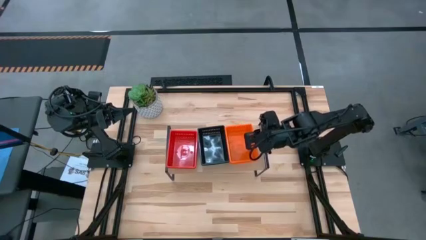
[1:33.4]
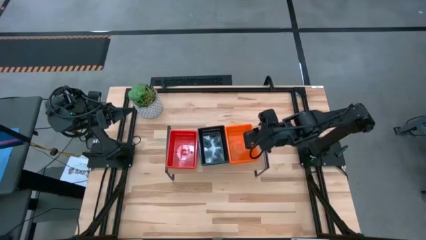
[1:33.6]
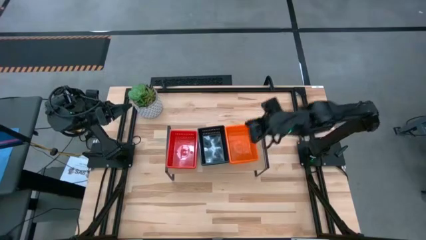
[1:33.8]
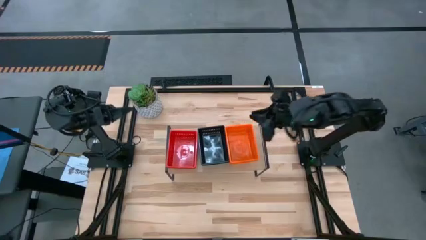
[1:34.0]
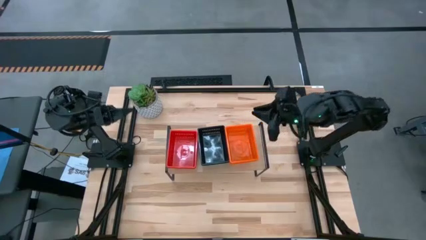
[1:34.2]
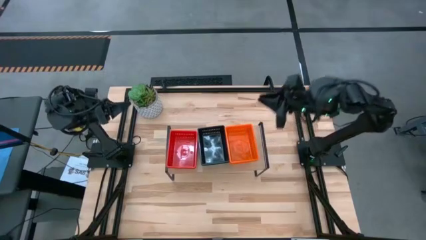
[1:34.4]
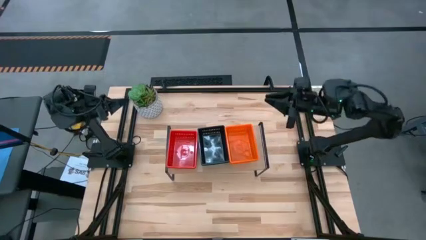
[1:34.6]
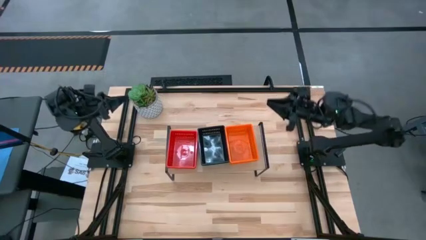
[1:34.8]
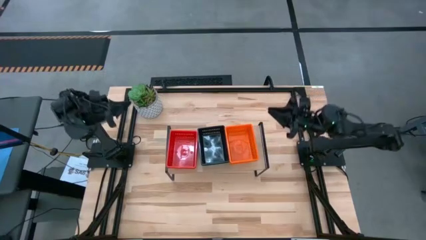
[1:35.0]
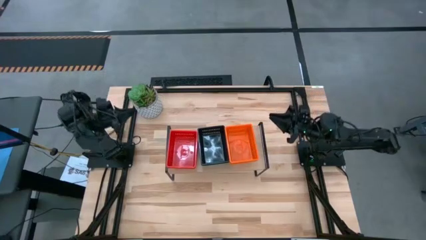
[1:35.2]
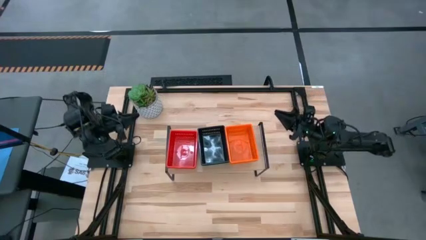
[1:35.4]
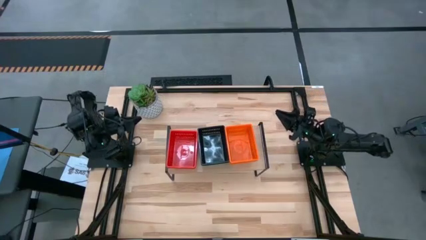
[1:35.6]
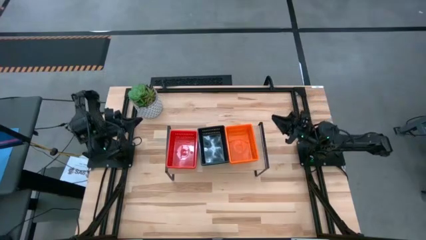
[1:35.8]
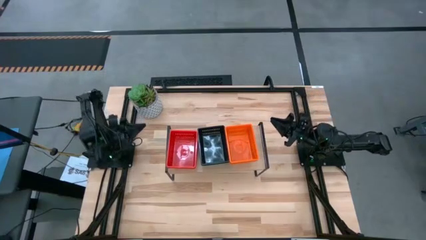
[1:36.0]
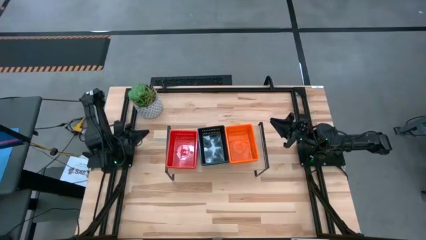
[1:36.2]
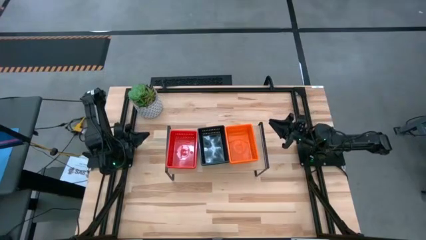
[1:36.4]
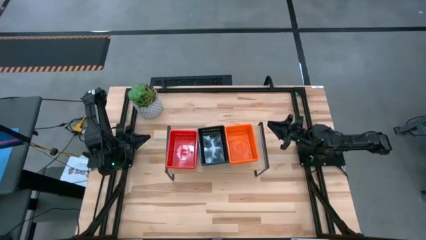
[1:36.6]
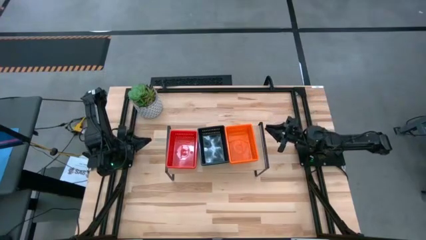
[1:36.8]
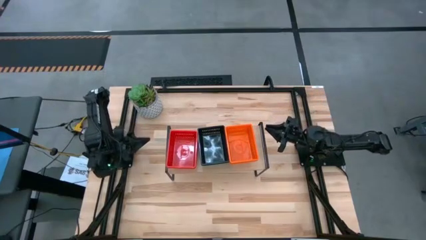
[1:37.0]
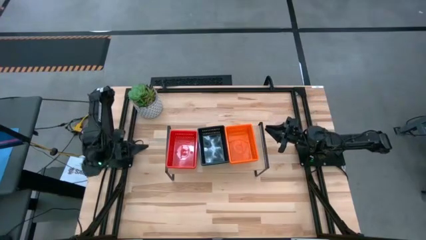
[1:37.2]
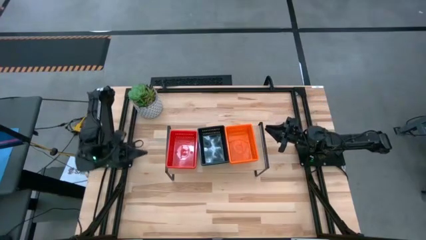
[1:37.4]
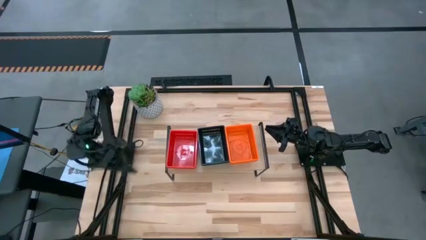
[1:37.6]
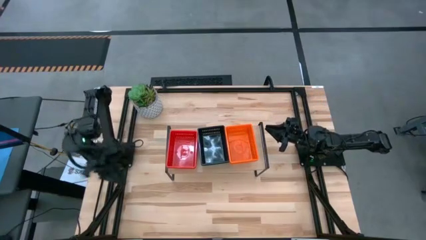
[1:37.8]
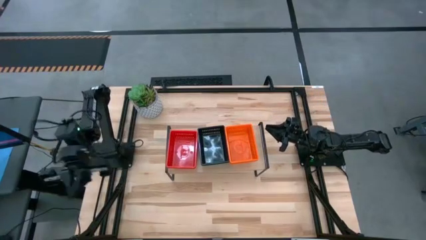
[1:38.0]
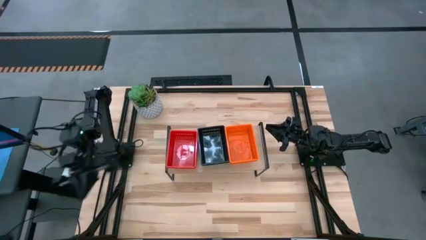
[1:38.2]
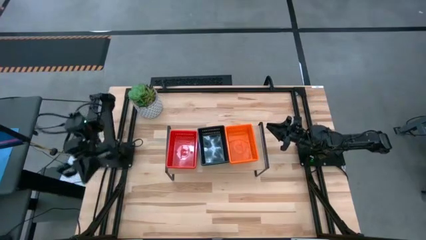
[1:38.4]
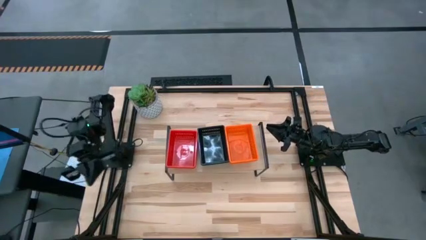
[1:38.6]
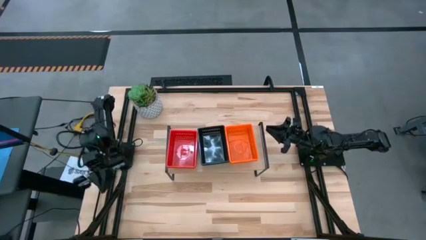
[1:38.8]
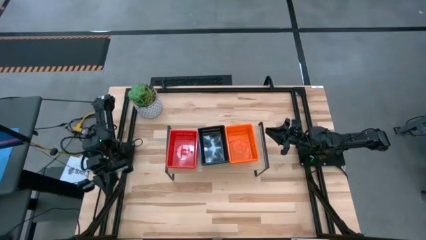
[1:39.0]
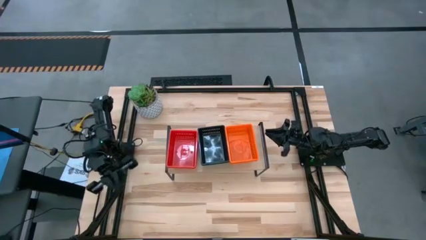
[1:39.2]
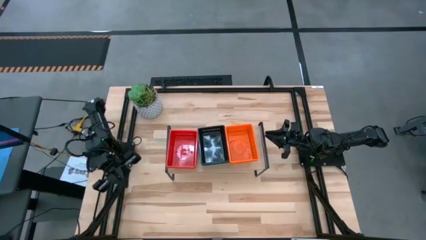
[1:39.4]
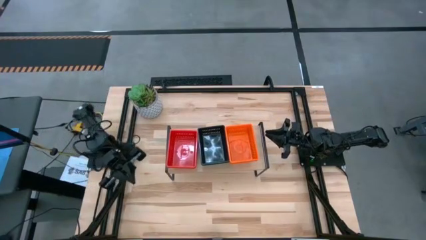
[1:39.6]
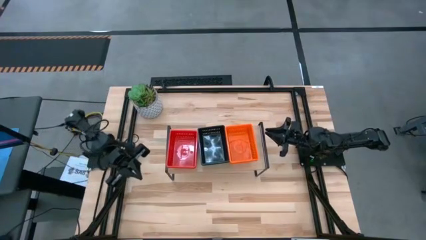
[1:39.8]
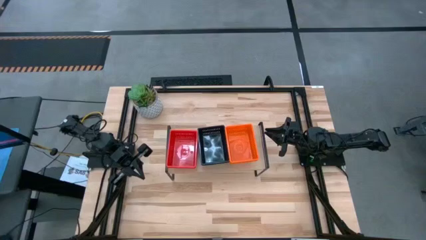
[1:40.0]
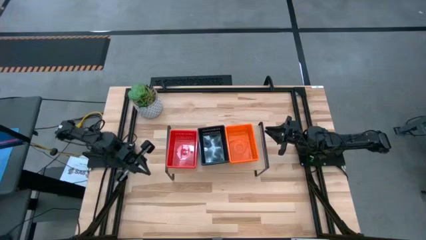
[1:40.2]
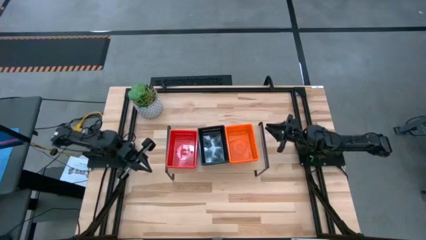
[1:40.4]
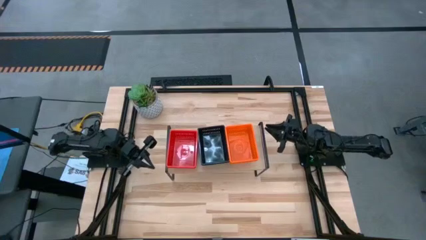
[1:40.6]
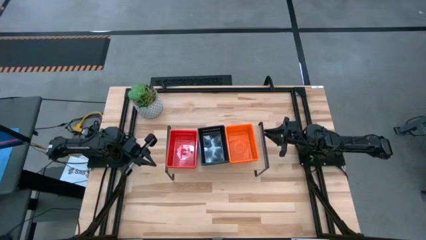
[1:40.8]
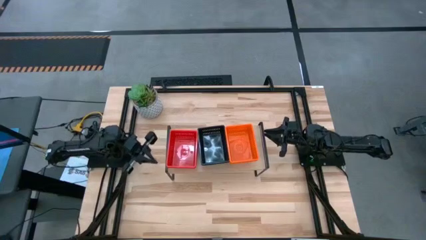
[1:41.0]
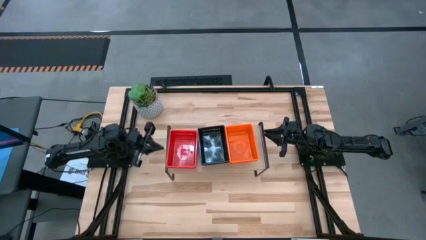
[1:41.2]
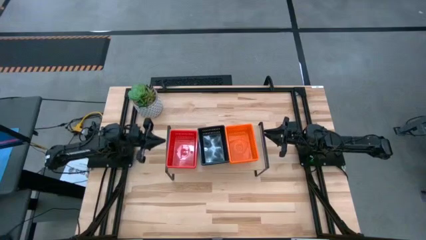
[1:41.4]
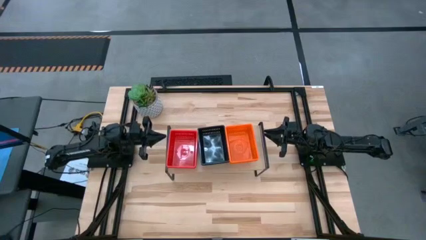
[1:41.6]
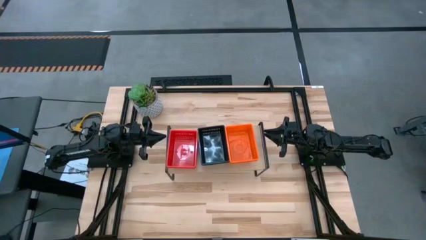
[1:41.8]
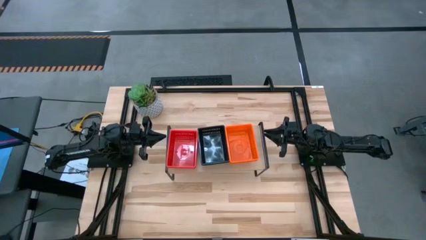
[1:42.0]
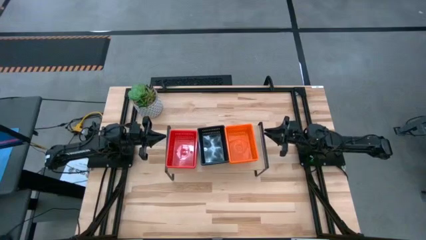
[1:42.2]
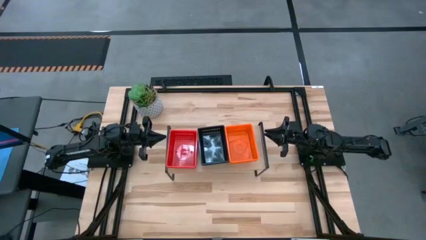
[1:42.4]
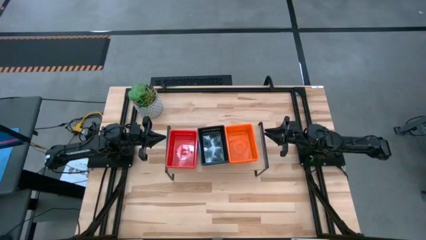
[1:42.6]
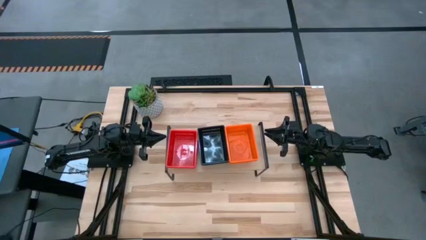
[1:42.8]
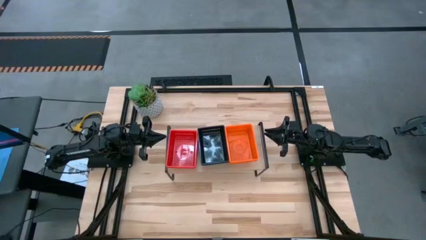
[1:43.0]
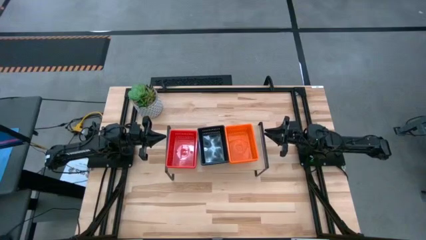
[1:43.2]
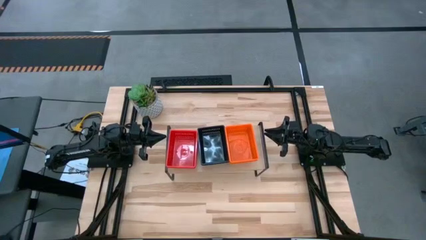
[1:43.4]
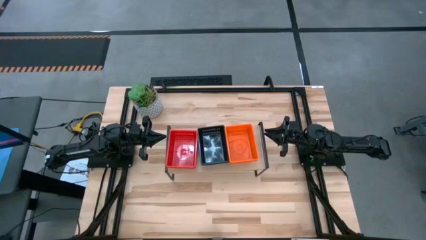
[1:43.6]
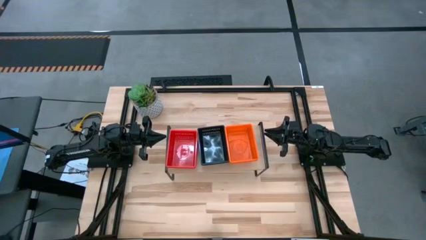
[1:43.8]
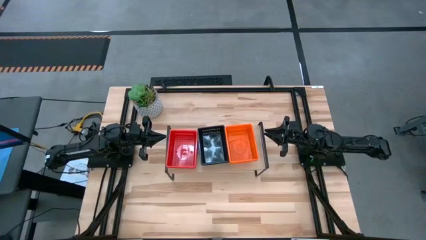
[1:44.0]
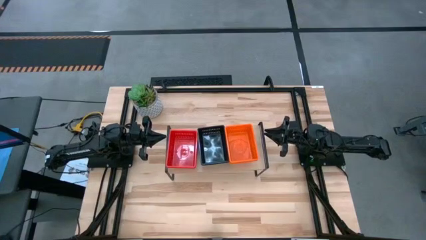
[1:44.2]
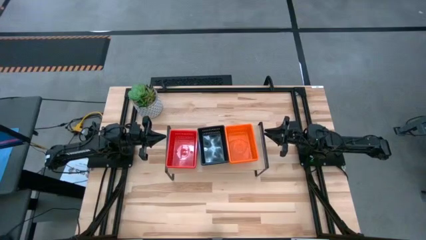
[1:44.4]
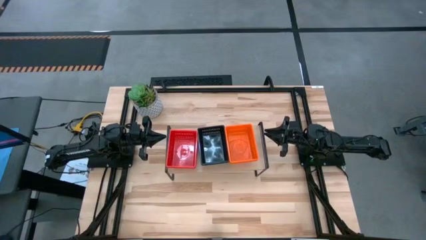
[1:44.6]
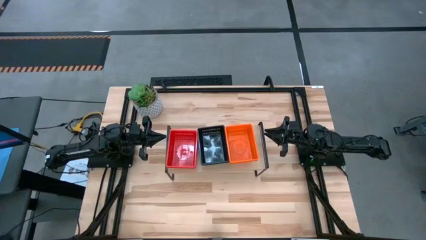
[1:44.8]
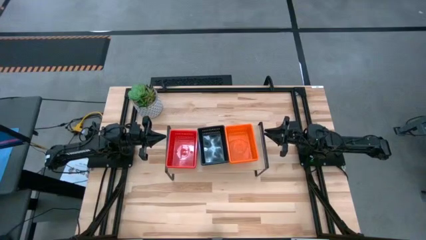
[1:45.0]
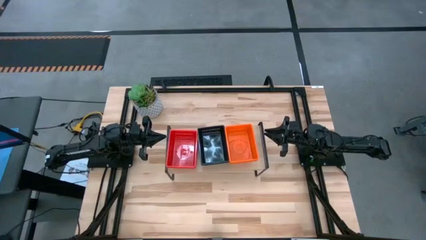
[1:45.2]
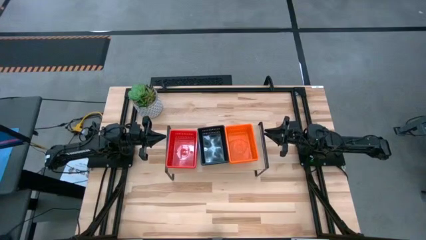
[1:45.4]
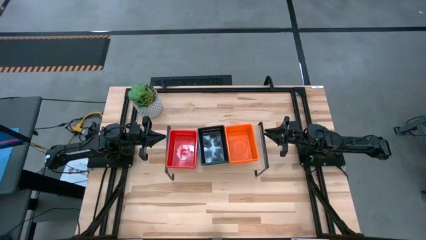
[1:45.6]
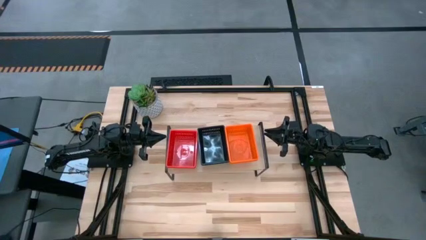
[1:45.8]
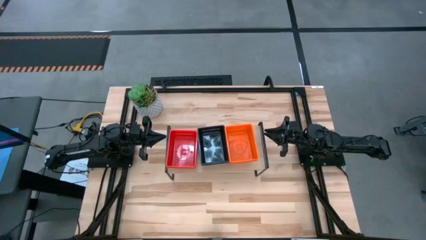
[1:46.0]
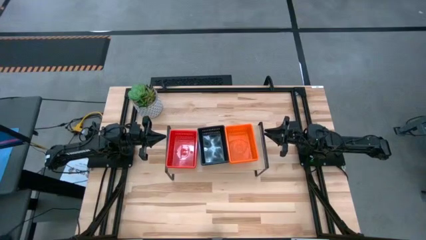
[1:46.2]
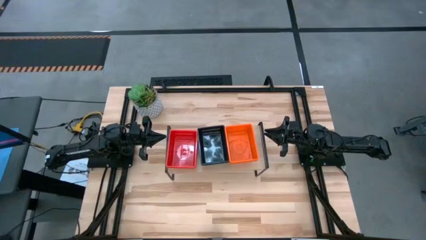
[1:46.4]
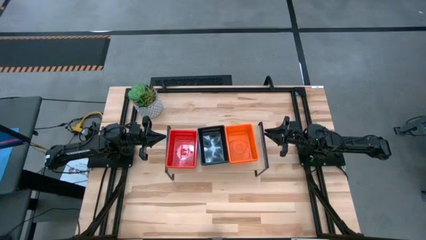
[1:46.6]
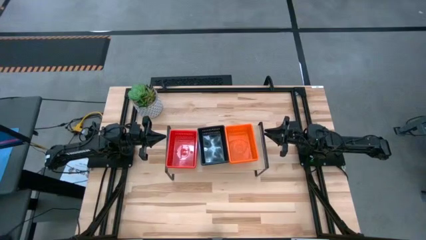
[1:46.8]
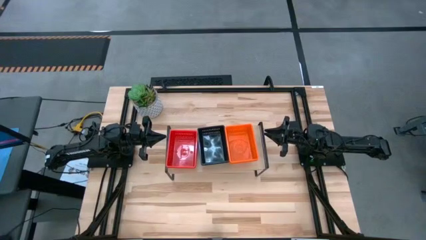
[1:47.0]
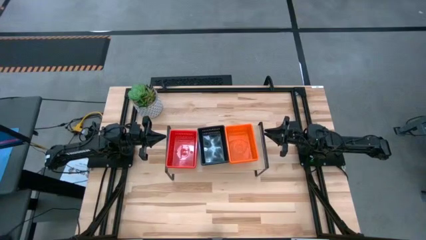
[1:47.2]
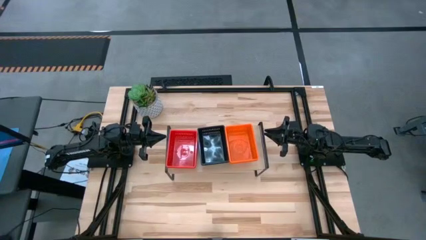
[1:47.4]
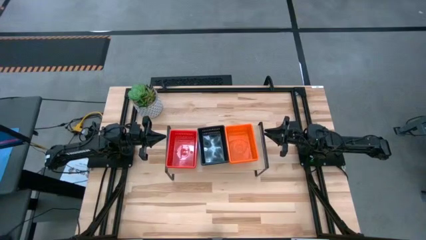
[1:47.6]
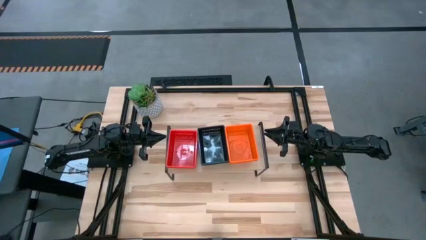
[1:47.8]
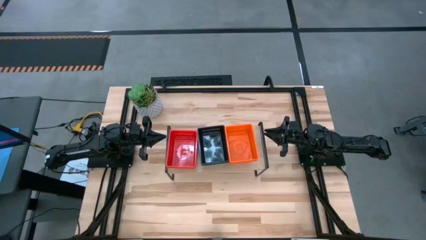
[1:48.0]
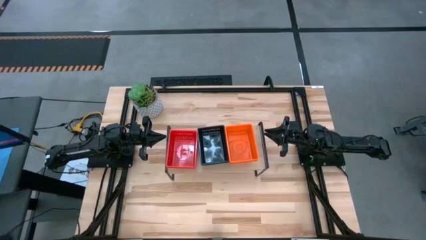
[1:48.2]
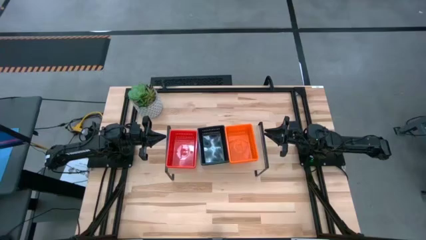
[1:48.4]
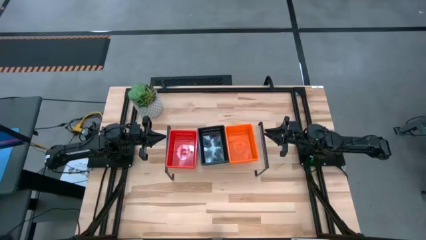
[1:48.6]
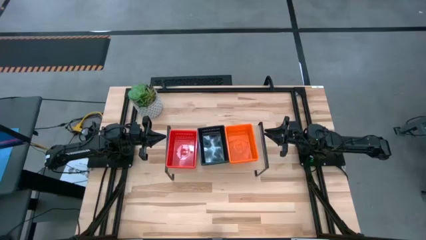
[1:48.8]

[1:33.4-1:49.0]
Task: Stack baskets on shelf by color
Return to home position
